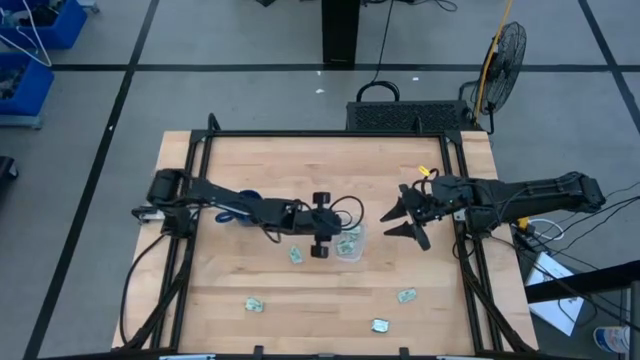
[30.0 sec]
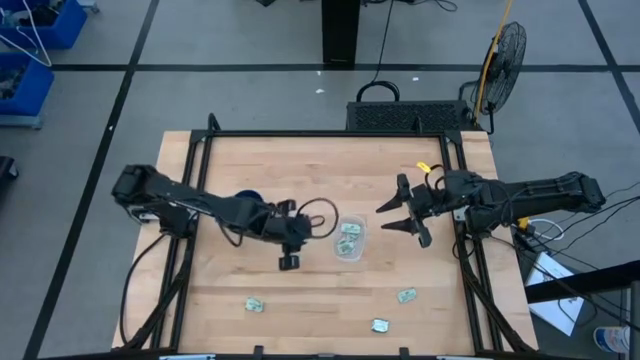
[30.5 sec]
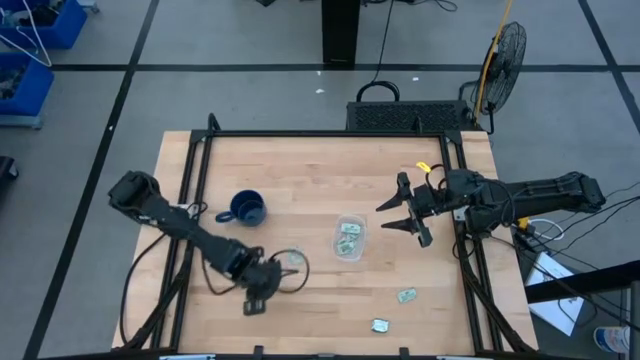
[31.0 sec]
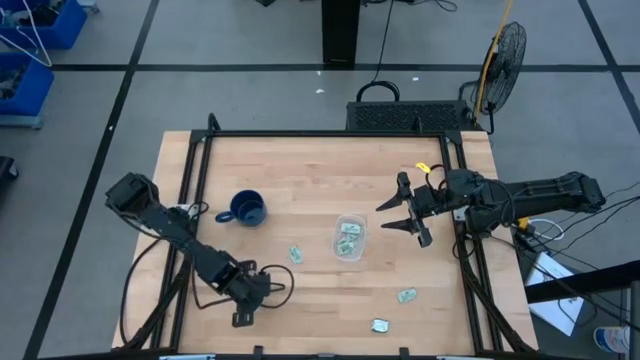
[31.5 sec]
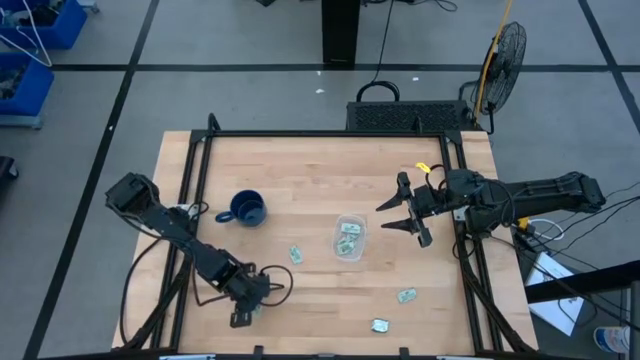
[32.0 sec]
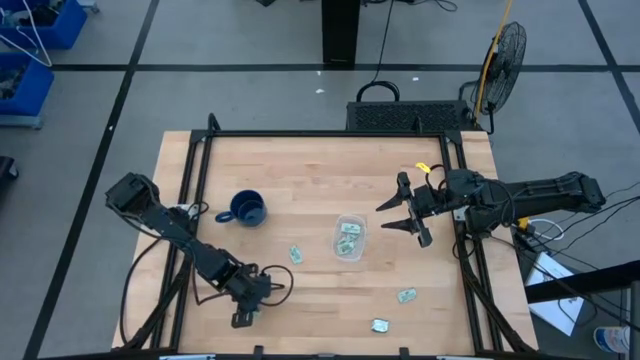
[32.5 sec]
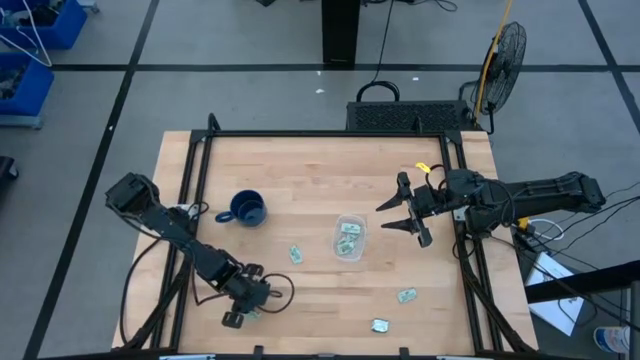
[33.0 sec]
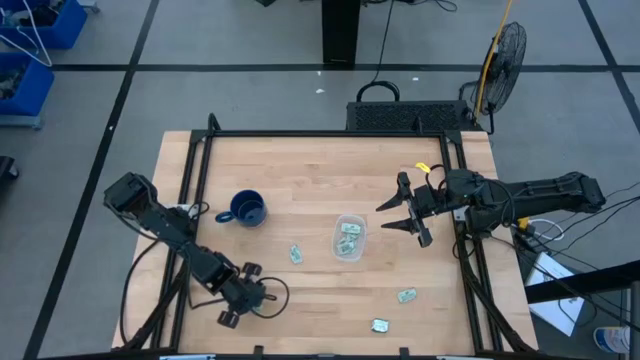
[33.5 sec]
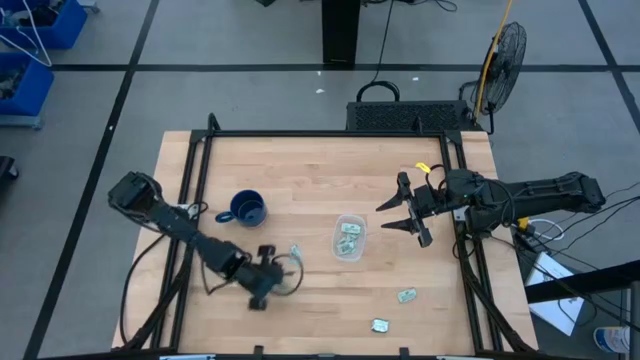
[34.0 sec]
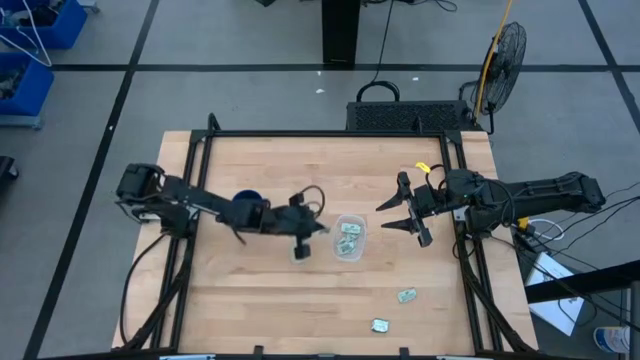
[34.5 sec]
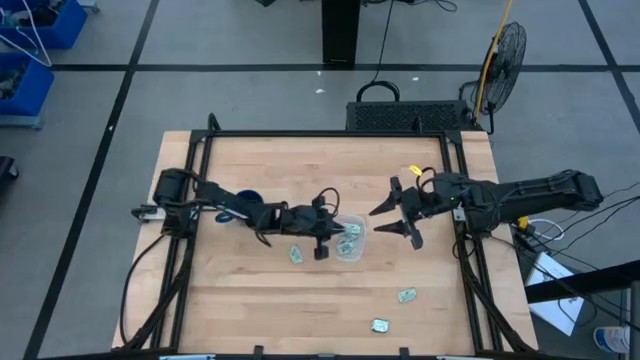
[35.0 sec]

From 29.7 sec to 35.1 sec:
Task: Pick and place Stevia / Truvia into bins
Put the stevia packet into the transparent container

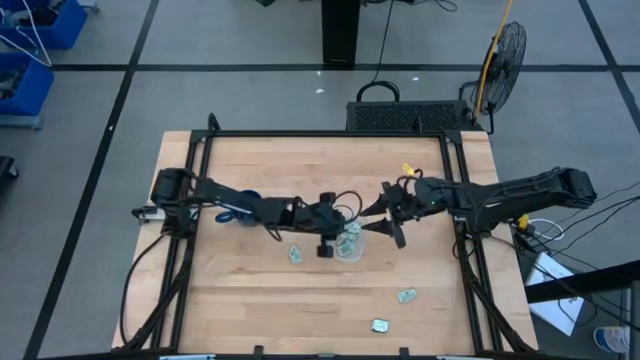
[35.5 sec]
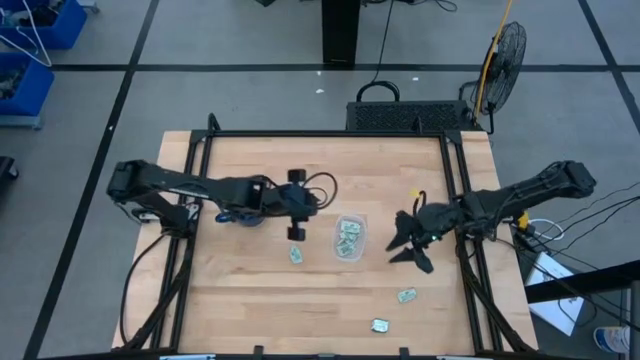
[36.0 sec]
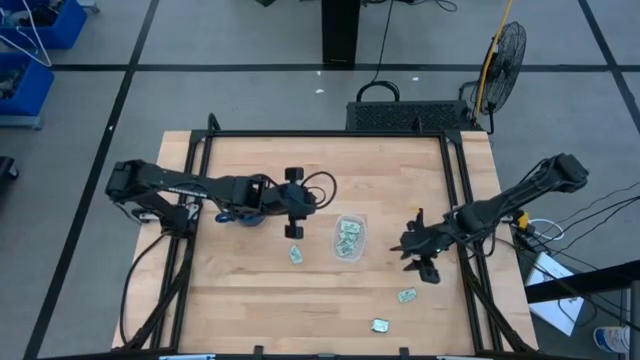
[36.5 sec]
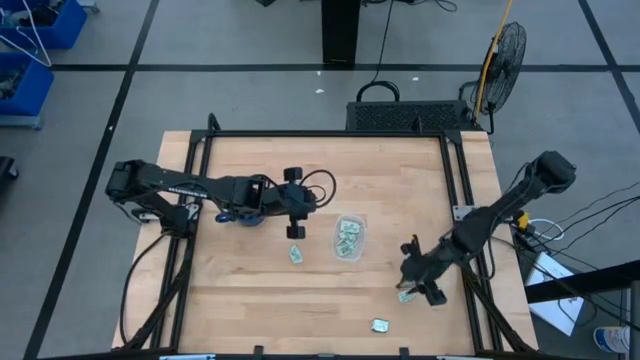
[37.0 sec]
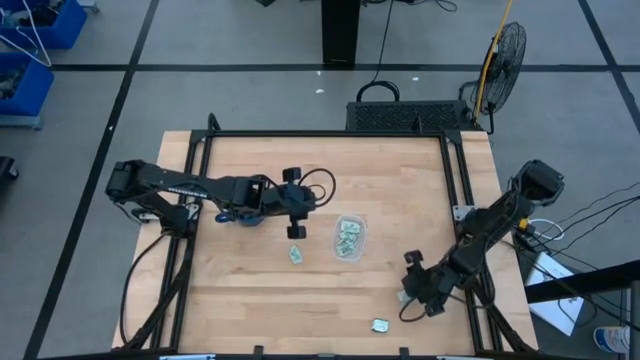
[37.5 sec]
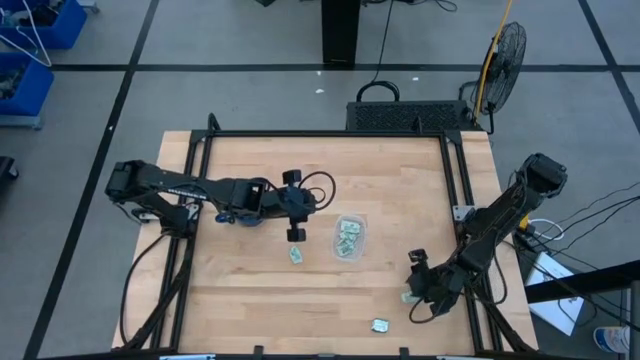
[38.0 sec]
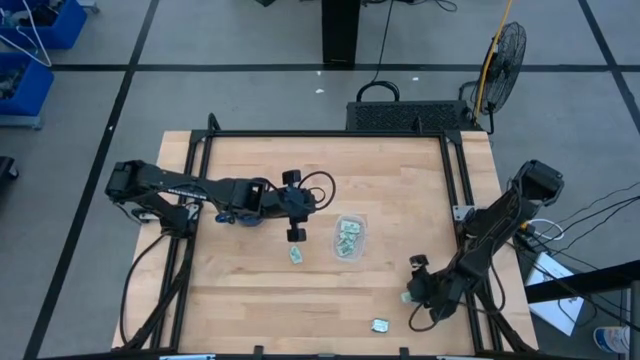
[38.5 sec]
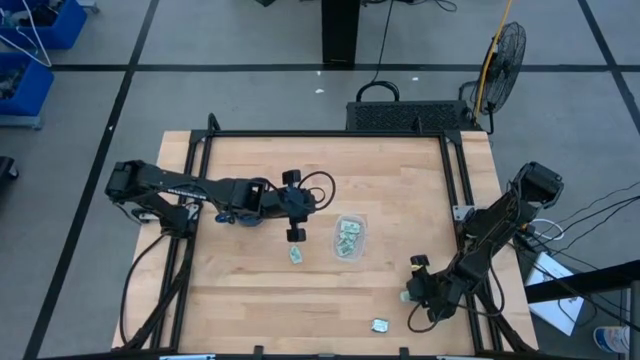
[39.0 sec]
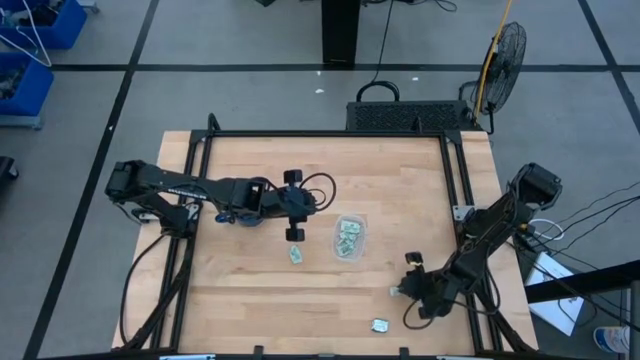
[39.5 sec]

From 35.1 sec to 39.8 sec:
Put the stevia packet into the transparent container

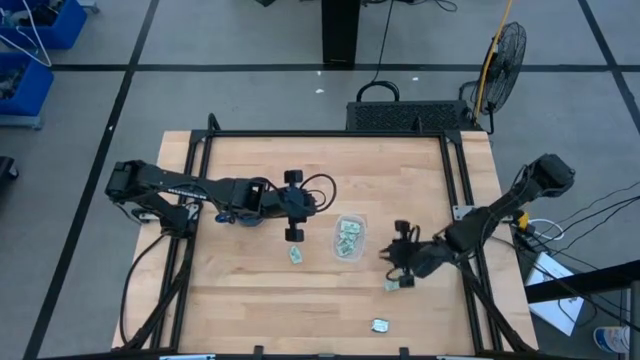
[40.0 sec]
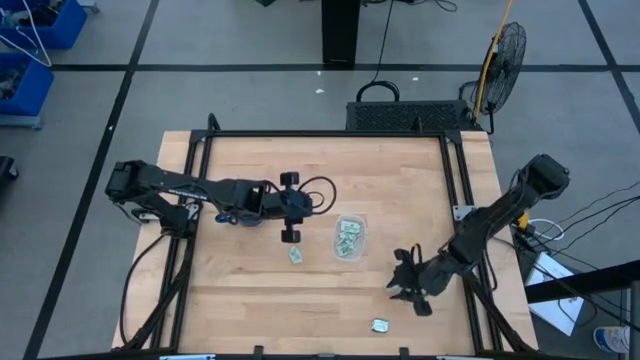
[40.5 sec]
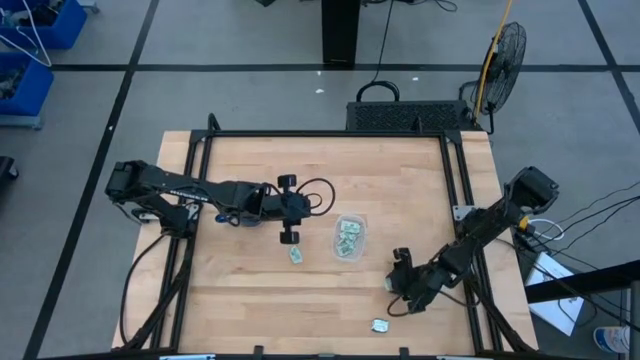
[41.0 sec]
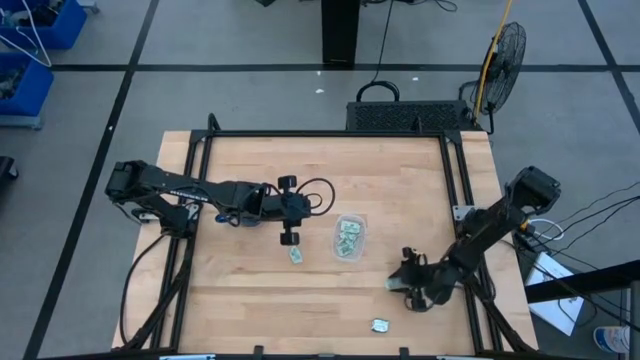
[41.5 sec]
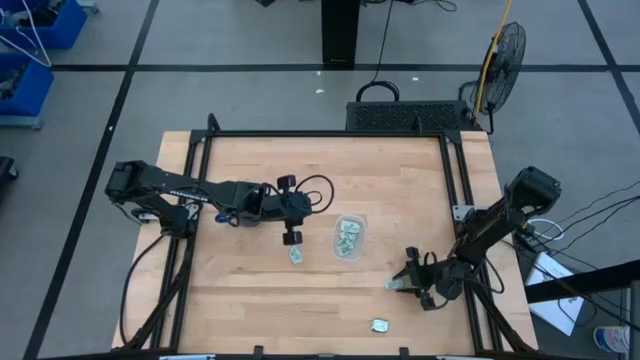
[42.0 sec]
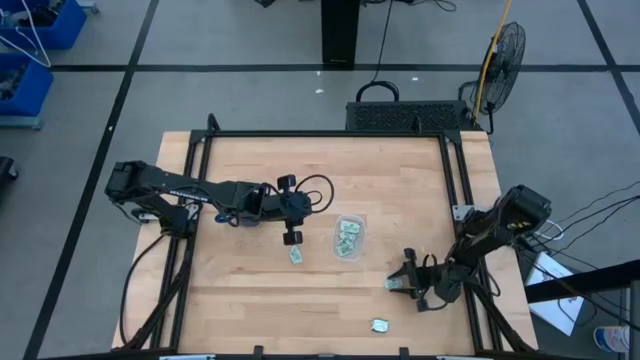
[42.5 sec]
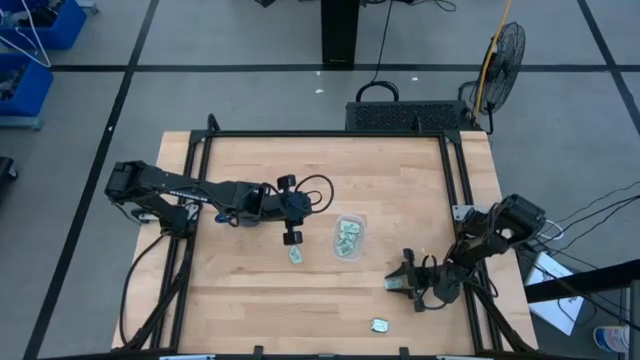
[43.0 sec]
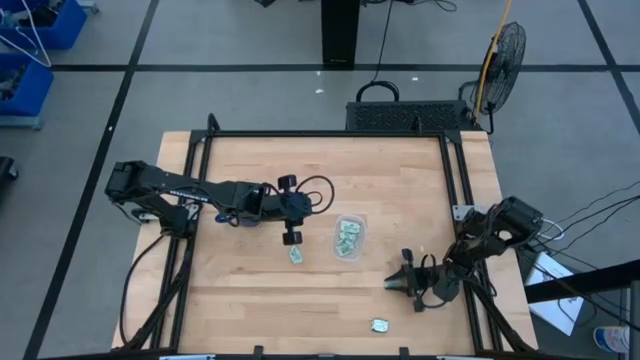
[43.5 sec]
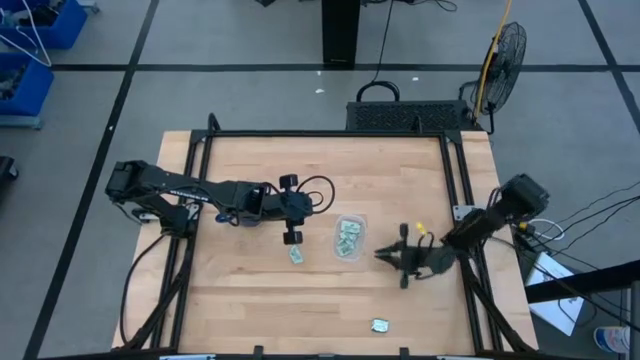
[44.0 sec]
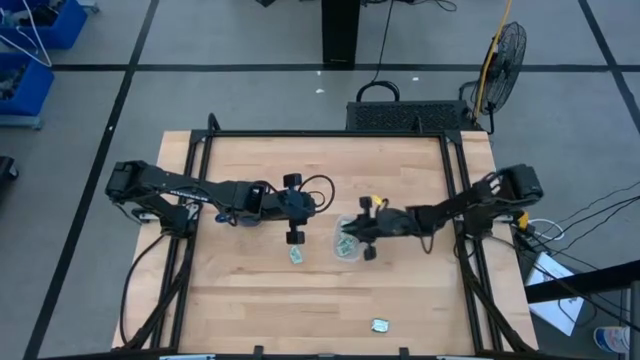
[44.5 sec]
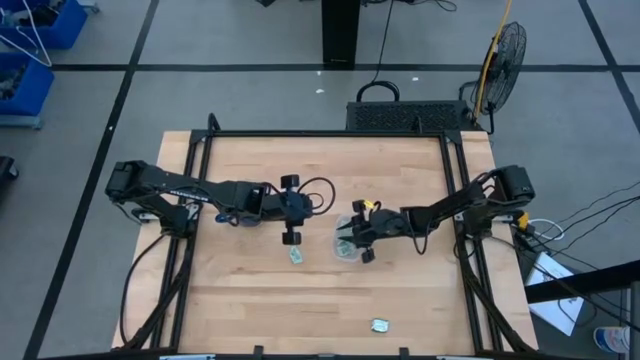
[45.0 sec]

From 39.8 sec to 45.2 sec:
Put the stevia packet into the transparent container

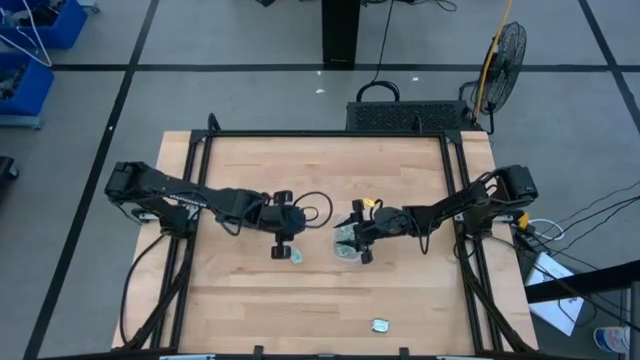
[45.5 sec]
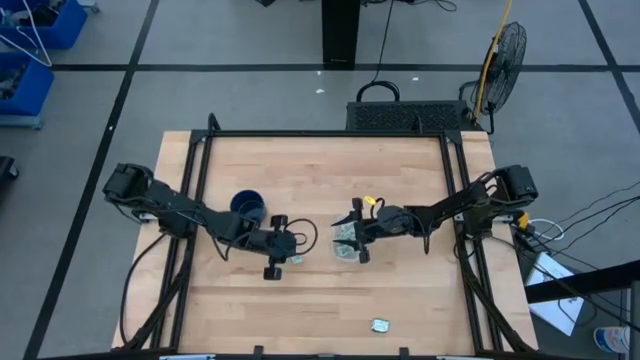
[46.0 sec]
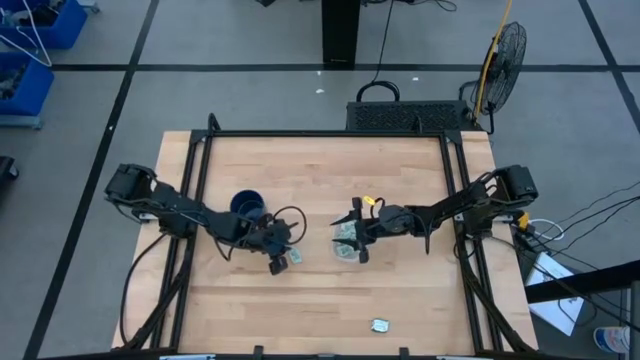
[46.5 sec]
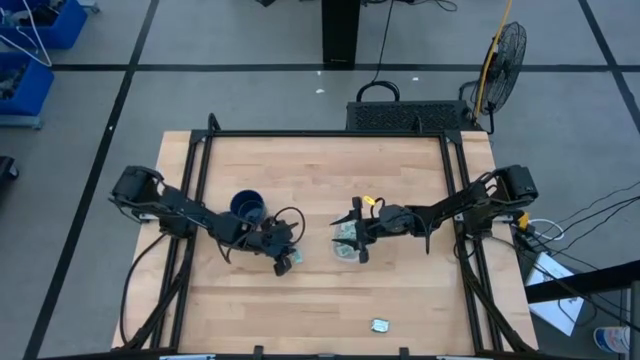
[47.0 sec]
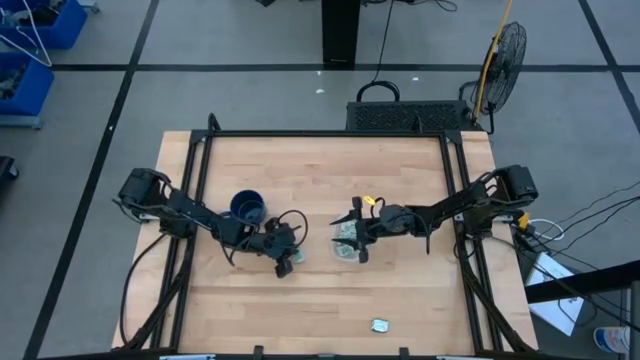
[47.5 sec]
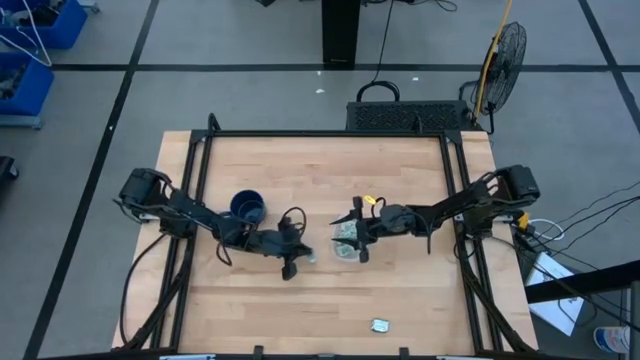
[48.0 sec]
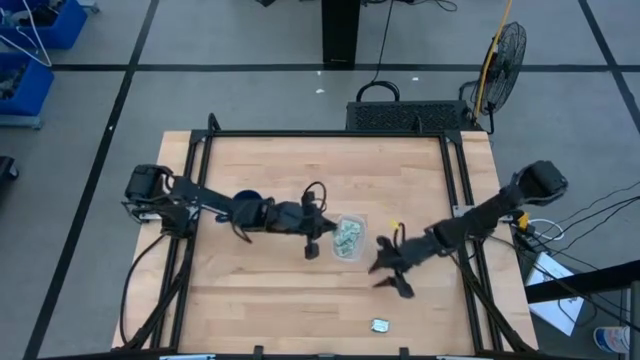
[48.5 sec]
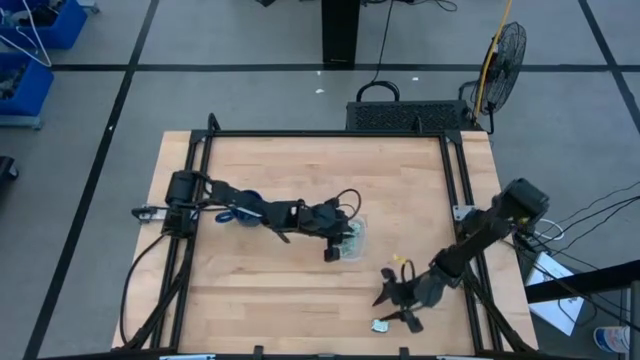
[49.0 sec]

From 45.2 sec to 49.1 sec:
Put the stevia packet into the transparent container

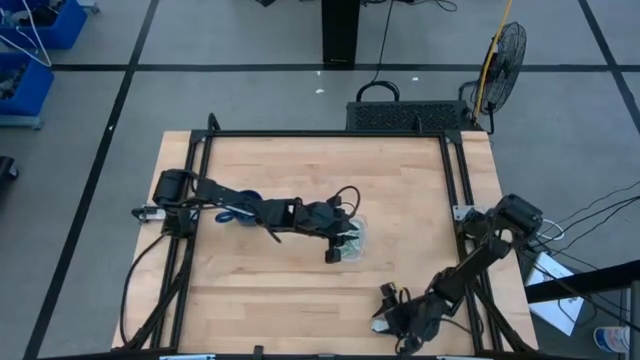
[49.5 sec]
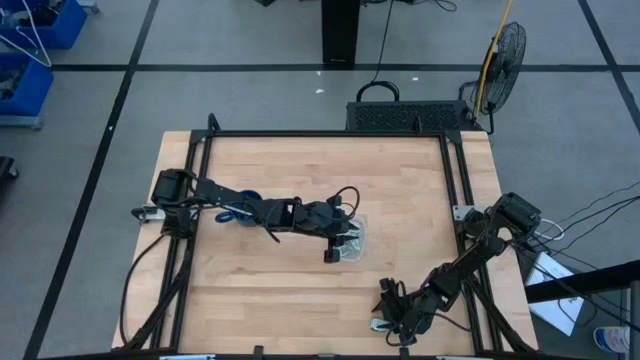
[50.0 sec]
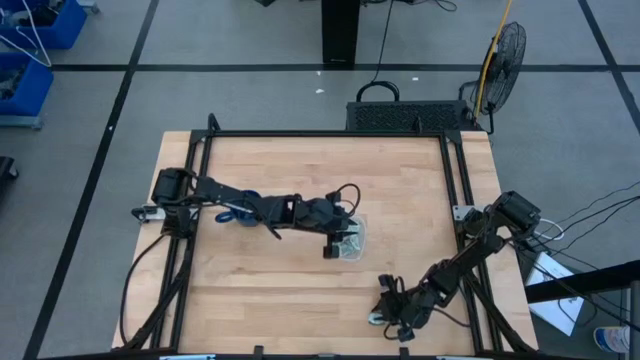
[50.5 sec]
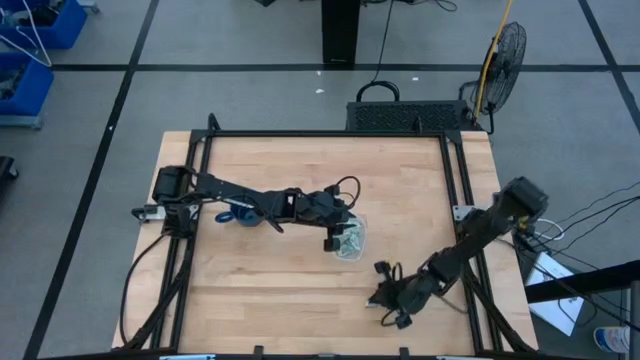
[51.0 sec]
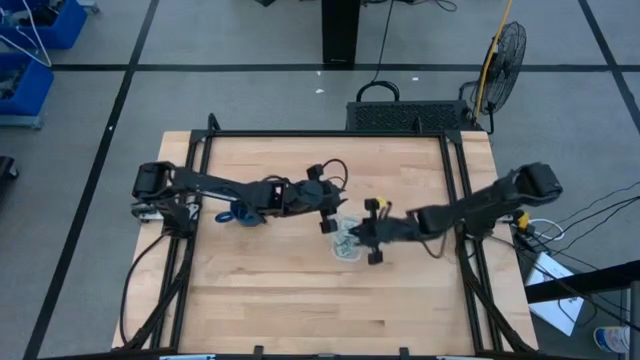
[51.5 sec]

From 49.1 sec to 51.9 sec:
Put the truvia packet into the transparent container
